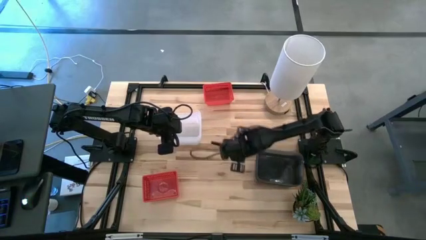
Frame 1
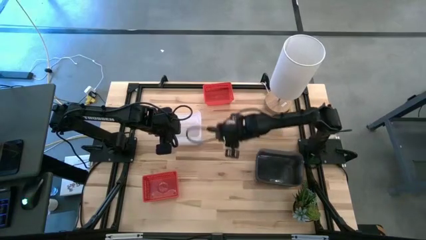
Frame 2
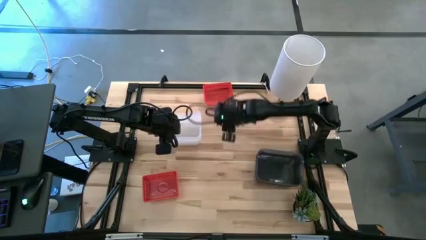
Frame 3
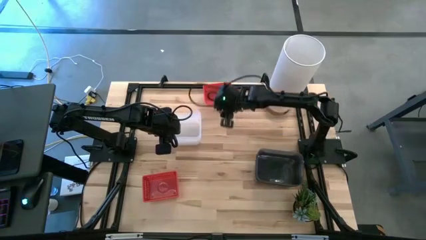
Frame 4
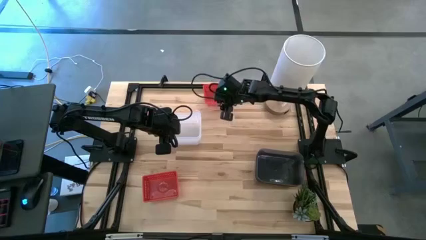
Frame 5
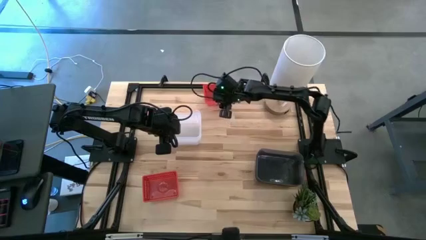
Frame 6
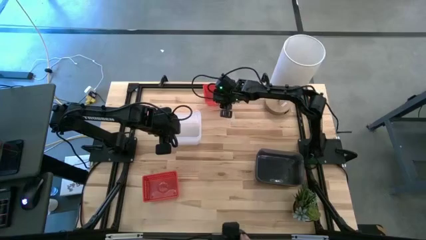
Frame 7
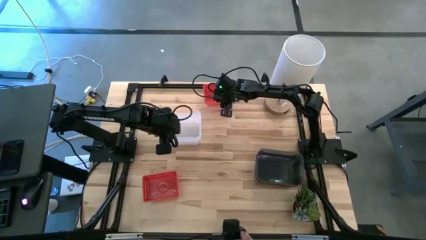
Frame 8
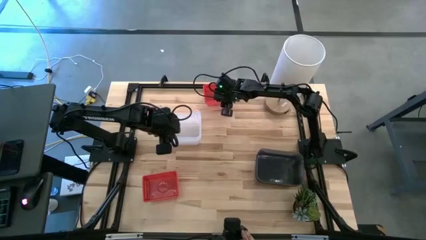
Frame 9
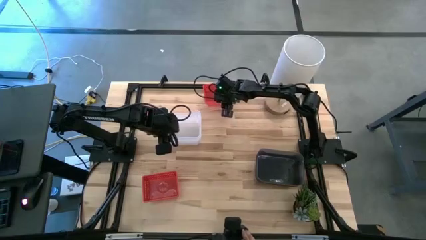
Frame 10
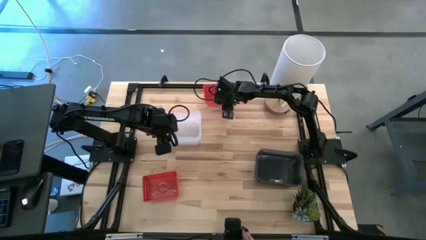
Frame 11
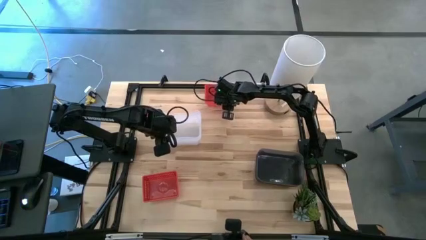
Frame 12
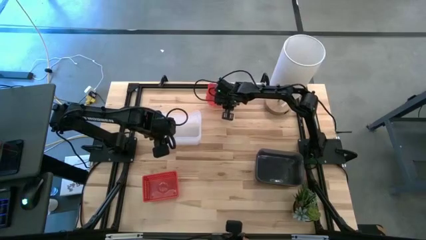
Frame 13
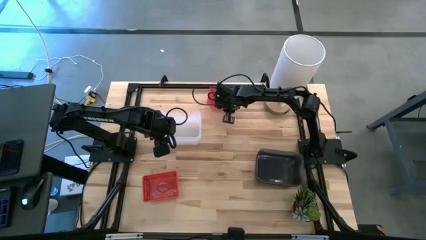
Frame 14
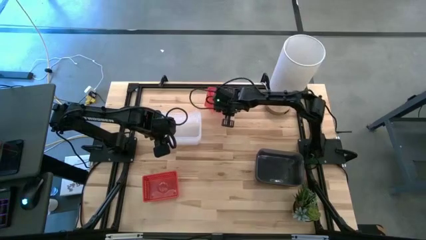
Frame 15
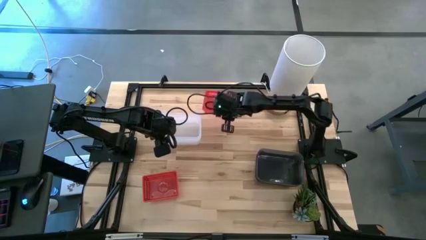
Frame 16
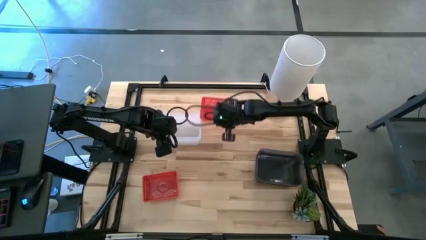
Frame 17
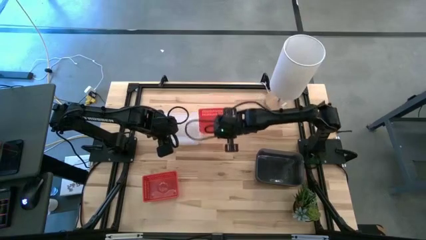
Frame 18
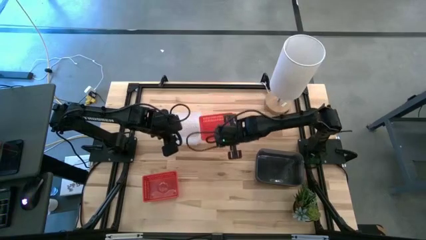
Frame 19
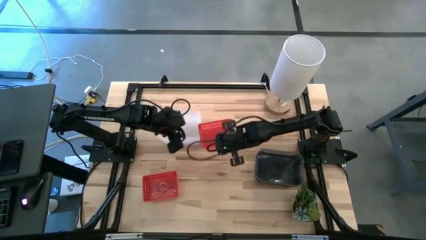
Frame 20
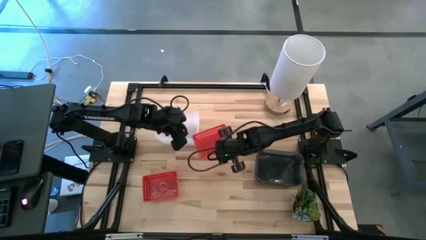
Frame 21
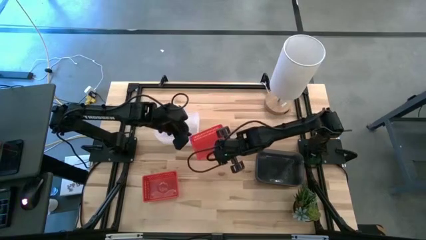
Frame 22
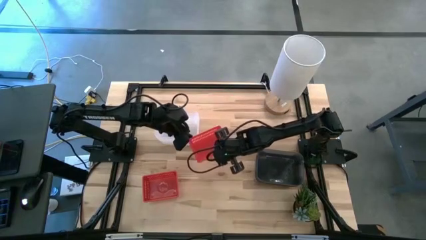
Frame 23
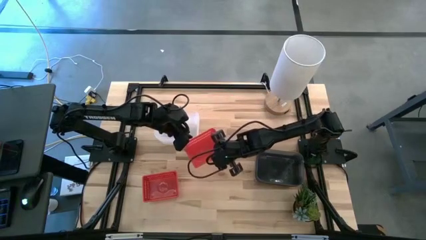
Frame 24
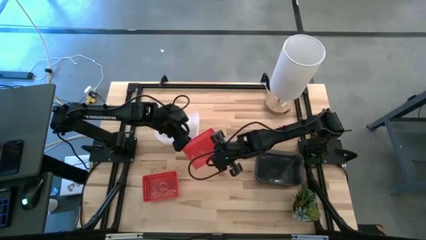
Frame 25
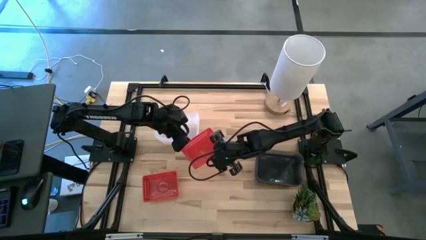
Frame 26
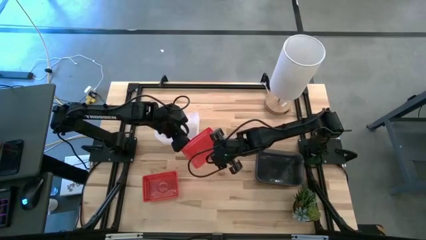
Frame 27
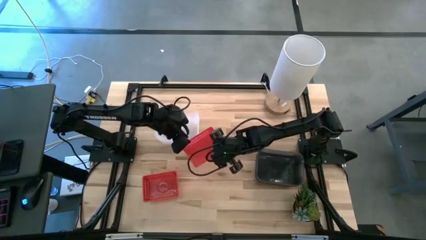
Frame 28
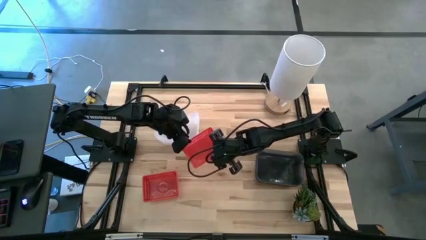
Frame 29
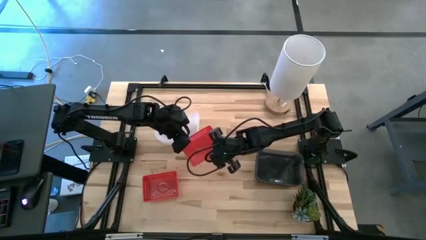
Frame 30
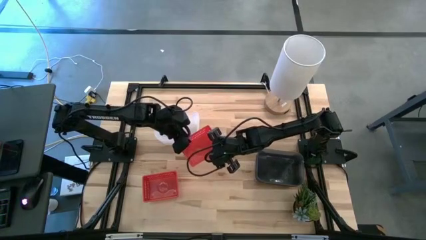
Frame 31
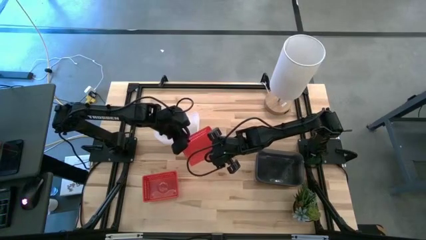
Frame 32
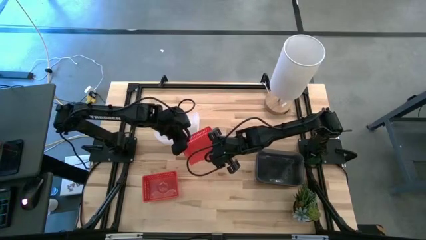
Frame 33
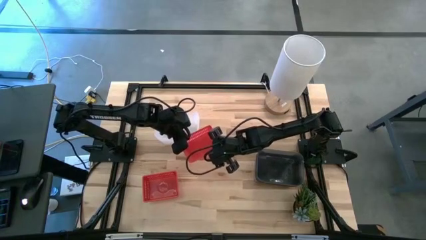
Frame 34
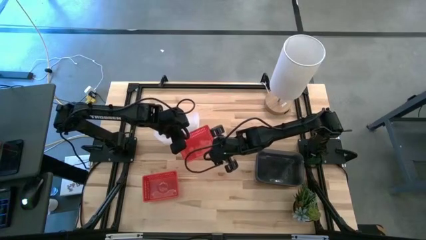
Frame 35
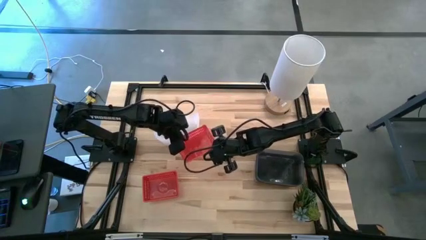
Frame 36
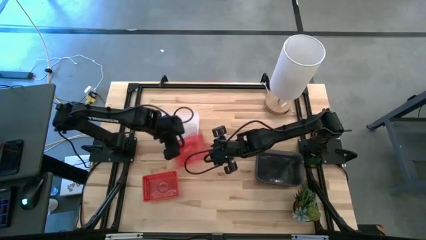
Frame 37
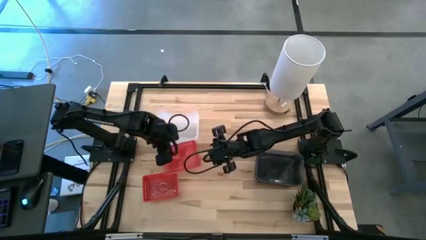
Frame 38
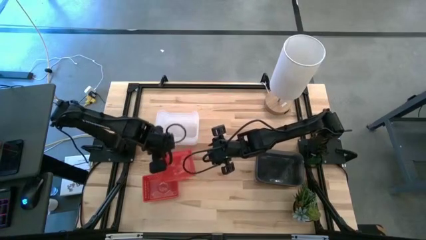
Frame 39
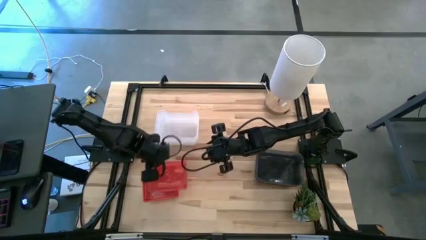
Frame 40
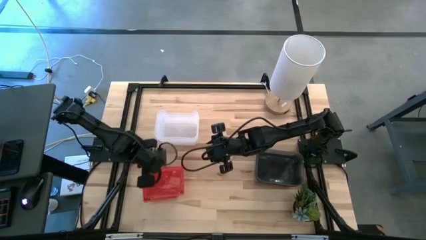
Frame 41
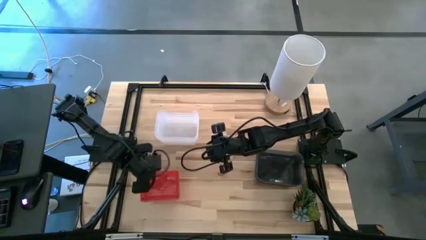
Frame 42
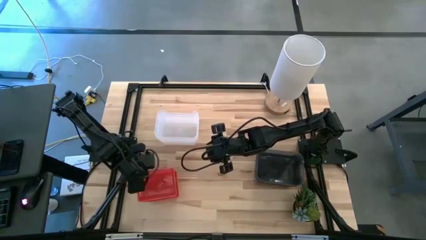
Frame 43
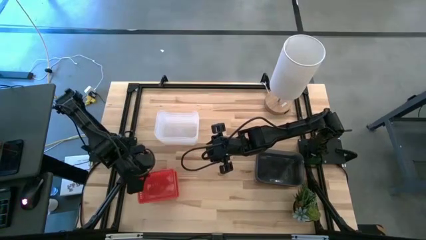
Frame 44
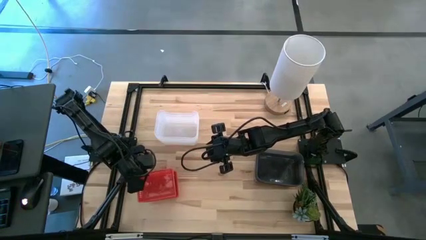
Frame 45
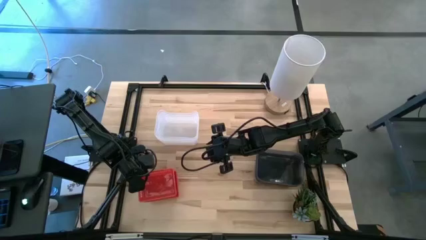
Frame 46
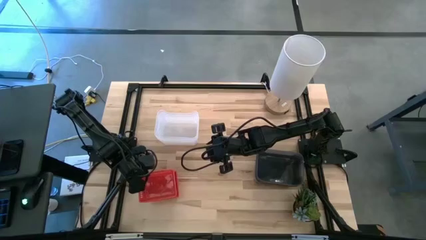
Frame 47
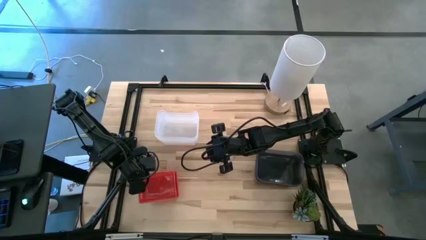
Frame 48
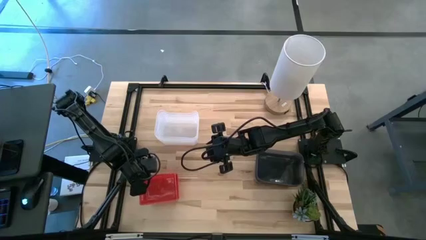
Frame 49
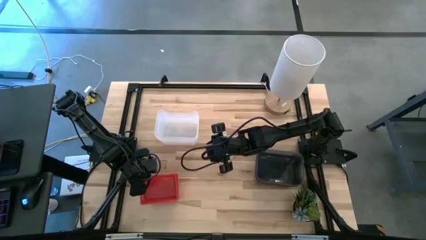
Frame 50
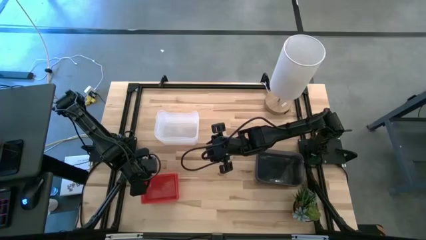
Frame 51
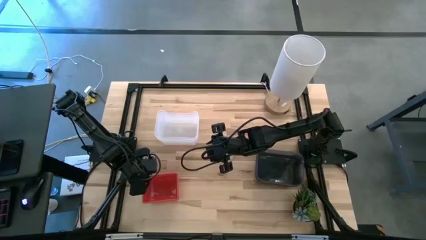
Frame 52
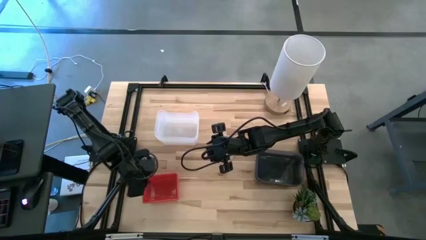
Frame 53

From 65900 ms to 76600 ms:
Stack the top red bin into the stacked red bins

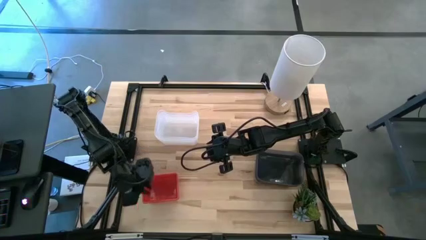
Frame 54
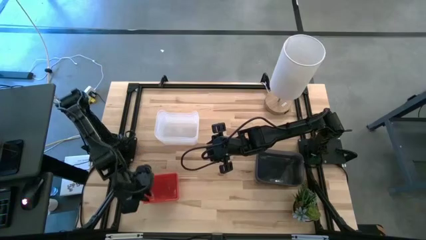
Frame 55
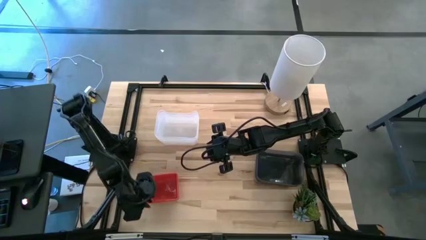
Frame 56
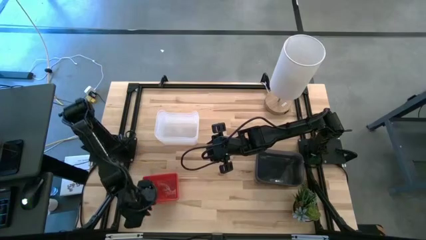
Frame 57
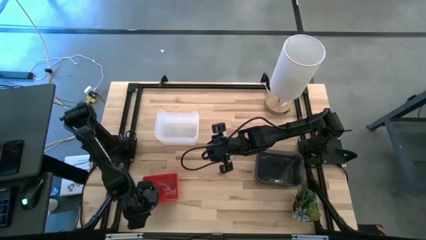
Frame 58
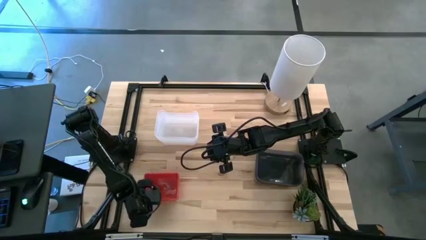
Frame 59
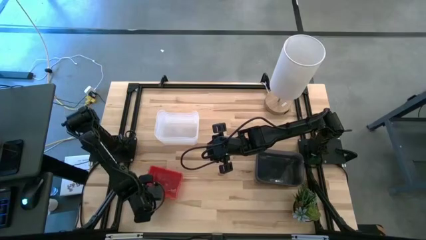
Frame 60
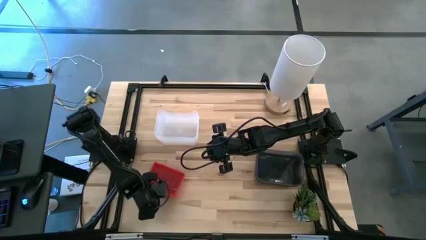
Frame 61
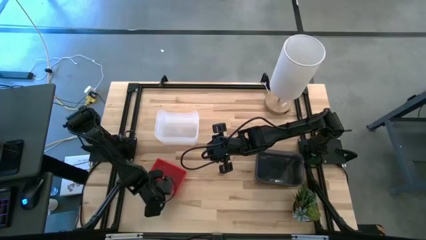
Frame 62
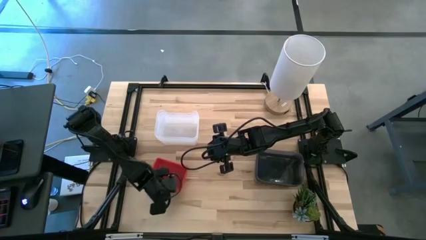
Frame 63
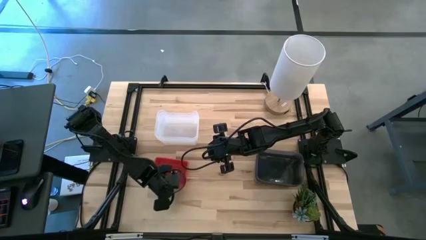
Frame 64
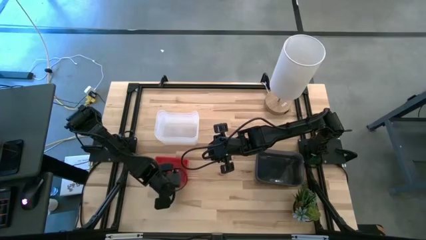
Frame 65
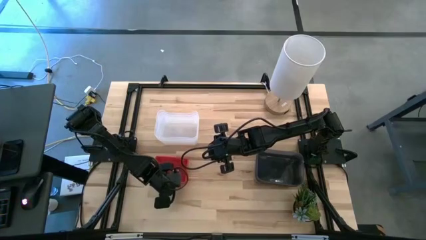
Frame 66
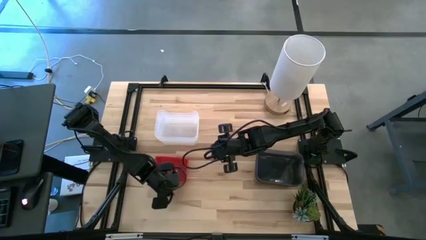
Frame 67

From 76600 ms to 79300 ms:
Move the red transparent bins to the middle left of the table

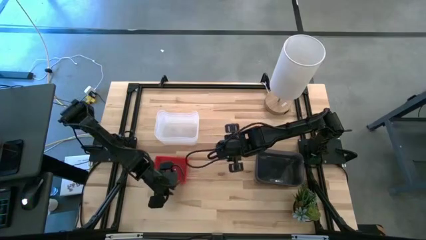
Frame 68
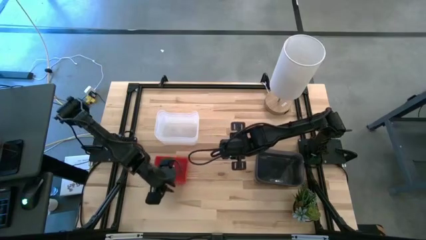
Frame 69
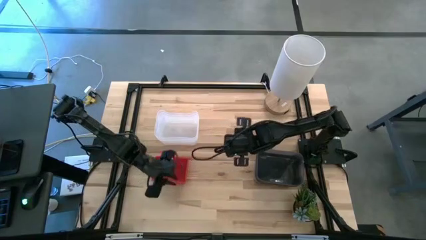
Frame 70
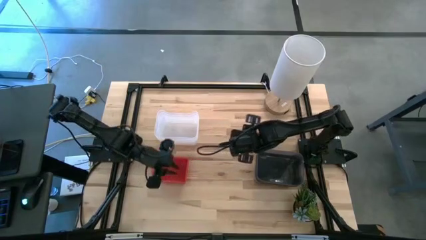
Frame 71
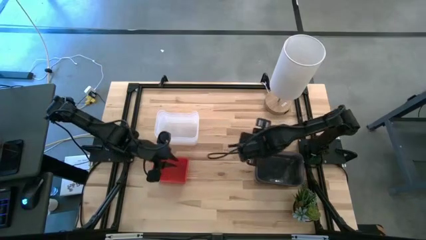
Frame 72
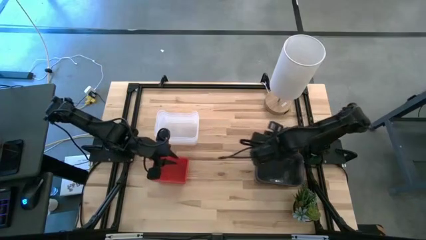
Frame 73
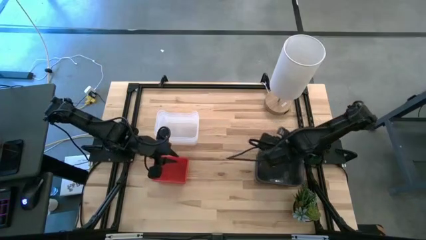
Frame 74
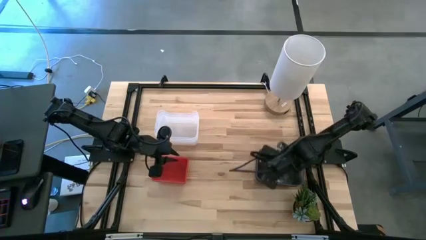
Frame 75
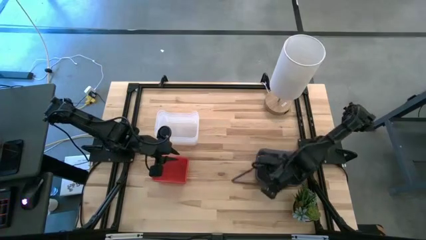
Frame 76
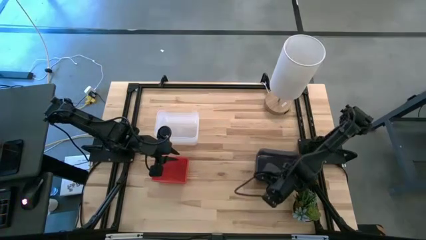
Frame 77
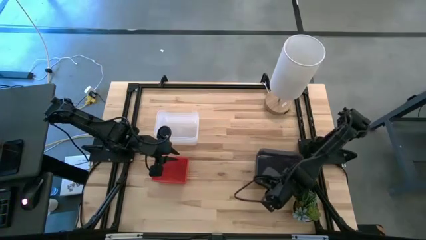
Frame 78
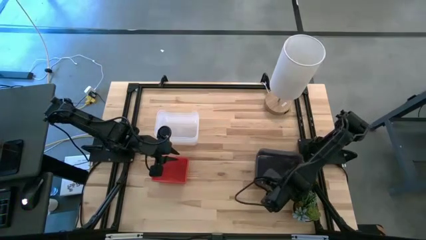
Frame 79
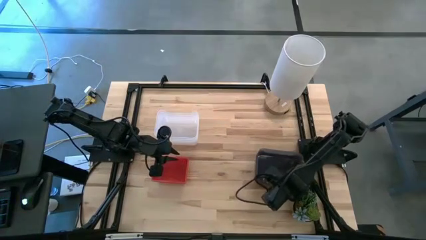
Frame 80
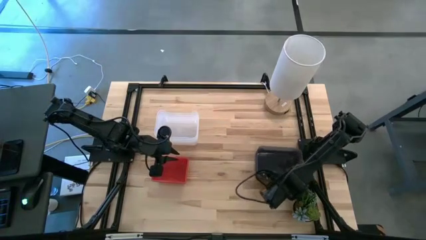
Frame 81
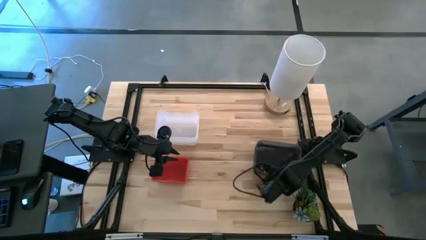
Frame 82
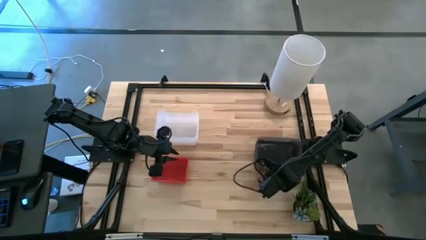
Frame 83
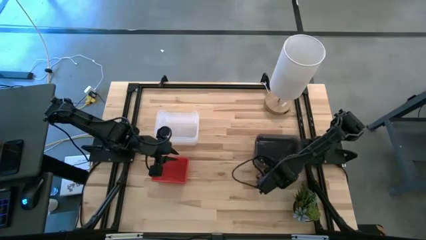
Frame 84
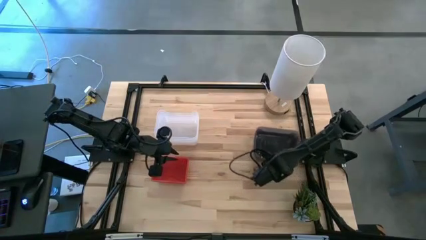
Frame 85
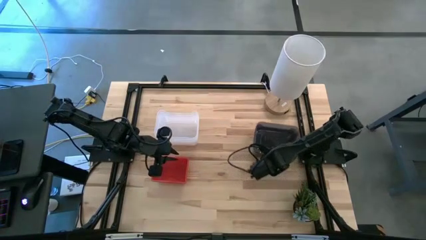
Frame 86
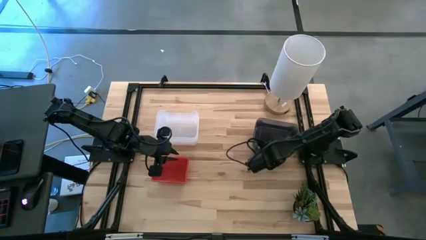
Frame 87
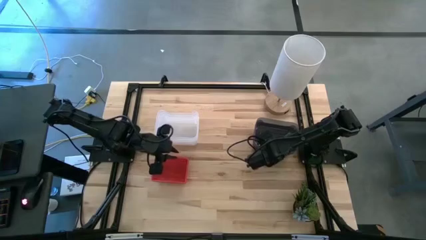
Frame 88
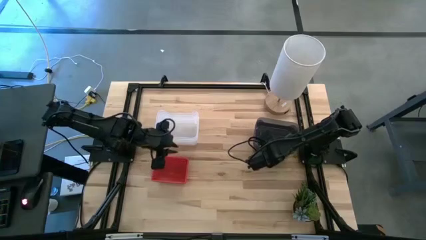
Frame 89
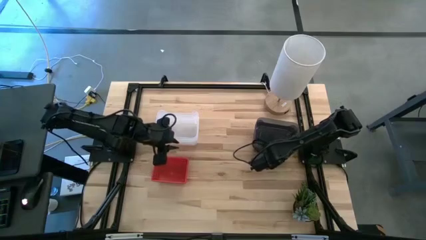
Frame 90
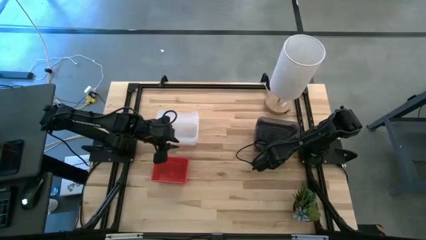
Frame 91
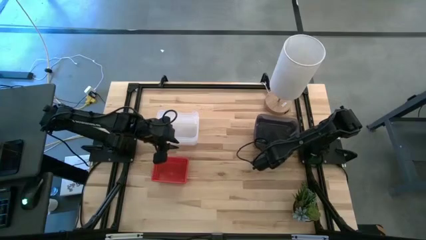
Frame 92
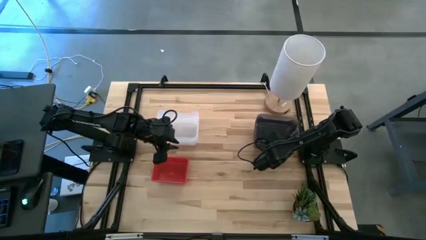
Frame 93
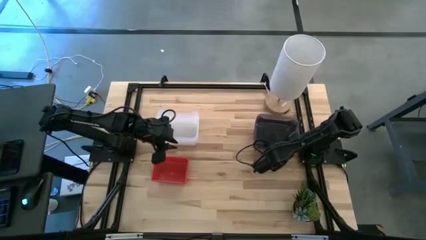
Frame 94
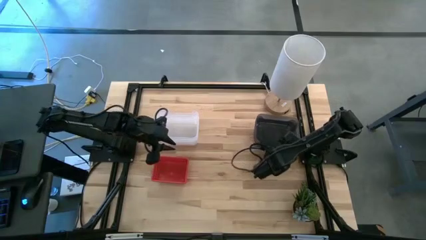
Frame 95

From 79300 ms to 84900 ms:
Move the black transparent bins to the top right of the table
